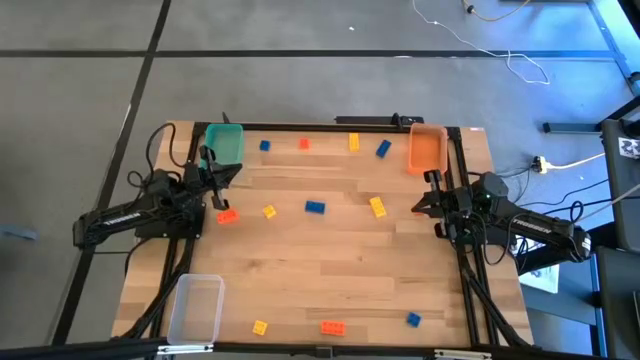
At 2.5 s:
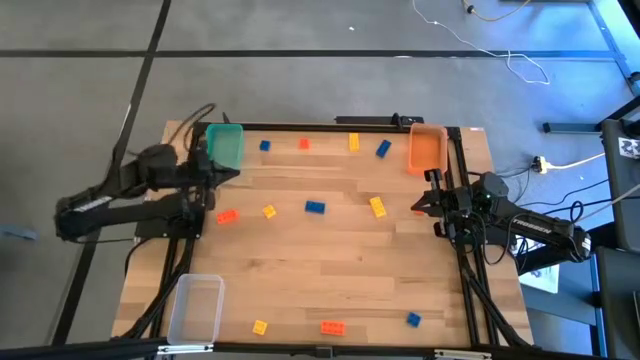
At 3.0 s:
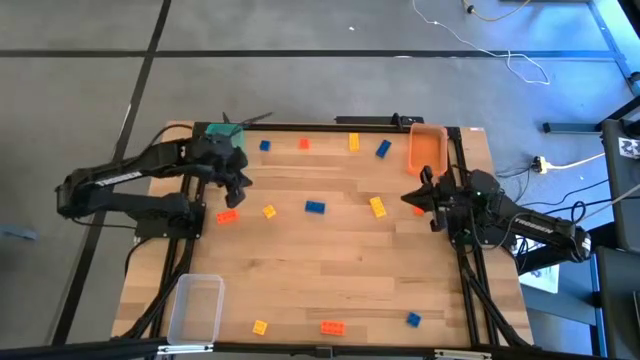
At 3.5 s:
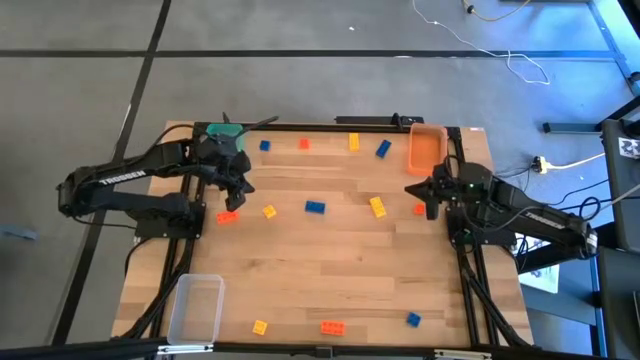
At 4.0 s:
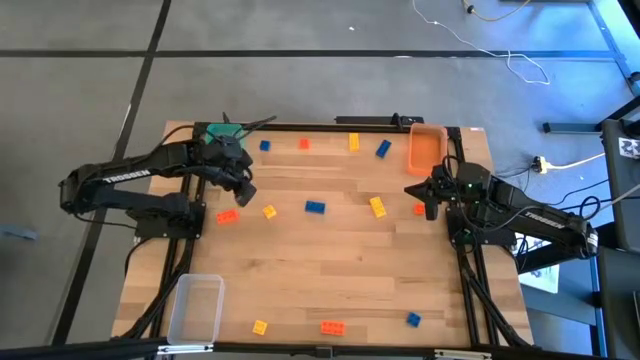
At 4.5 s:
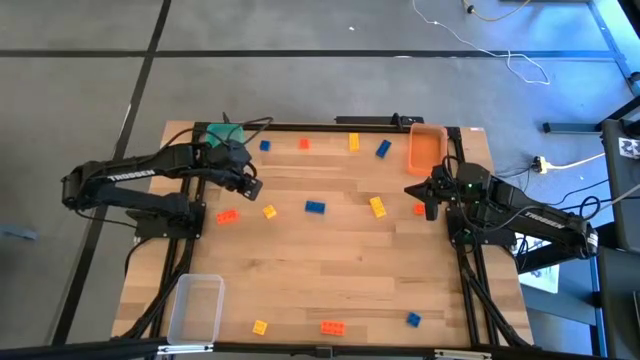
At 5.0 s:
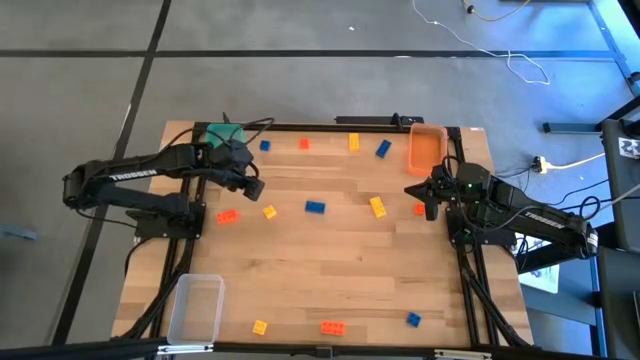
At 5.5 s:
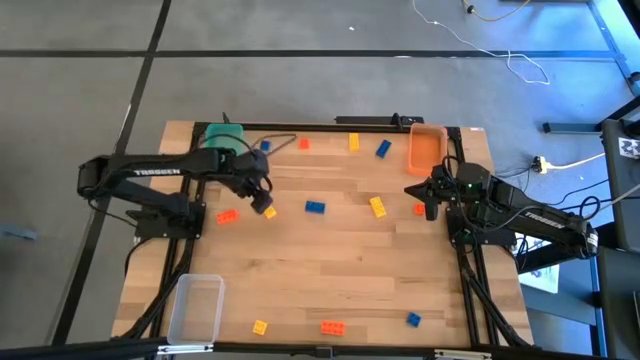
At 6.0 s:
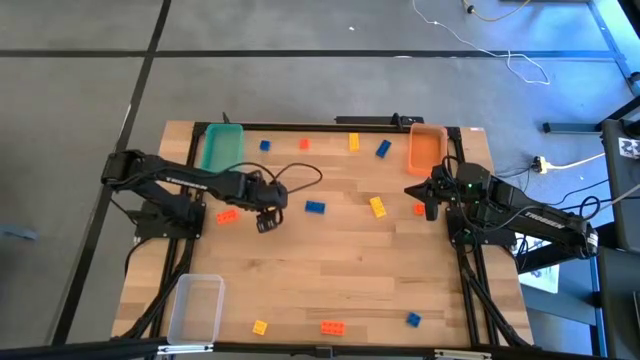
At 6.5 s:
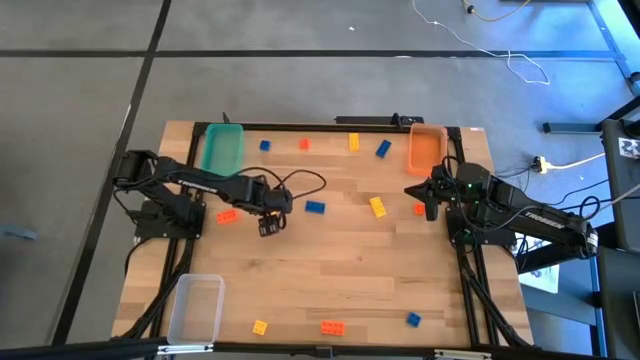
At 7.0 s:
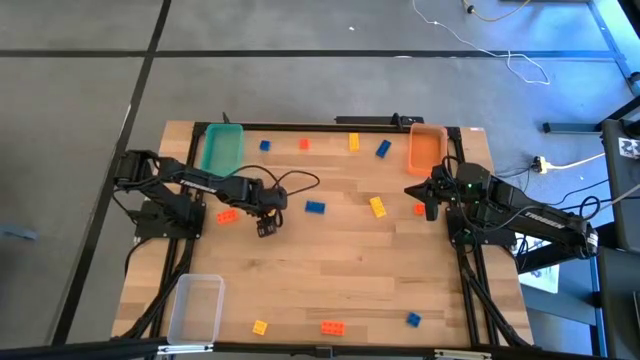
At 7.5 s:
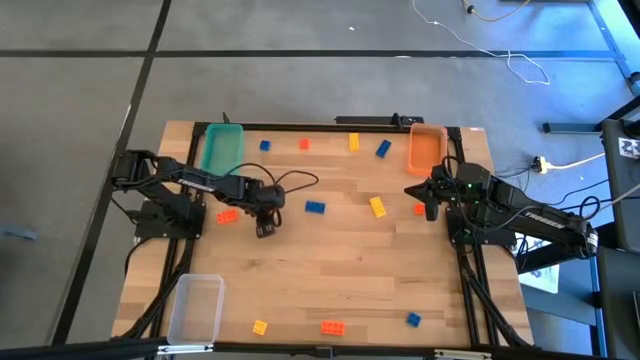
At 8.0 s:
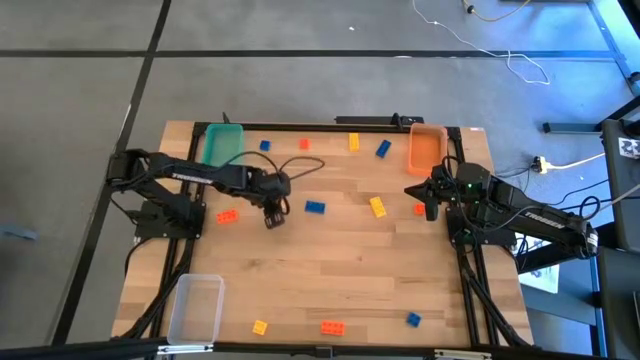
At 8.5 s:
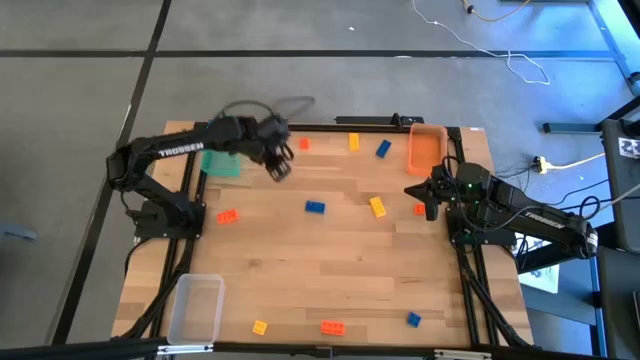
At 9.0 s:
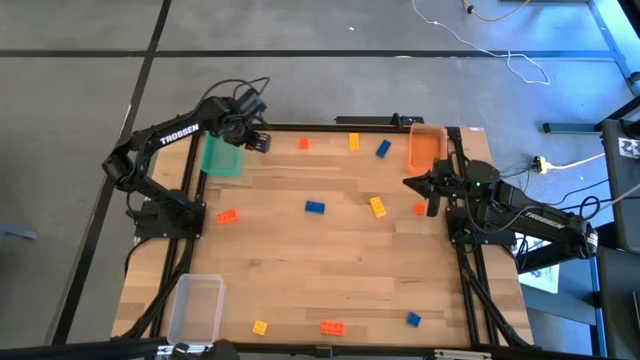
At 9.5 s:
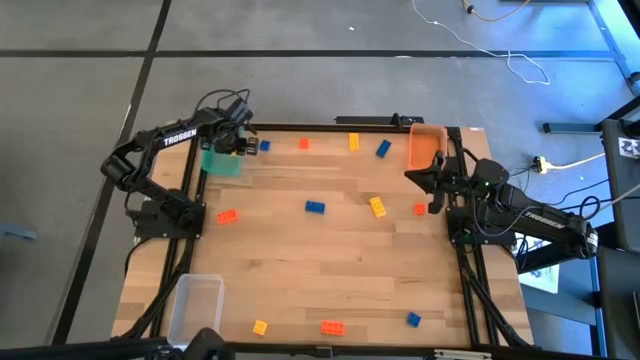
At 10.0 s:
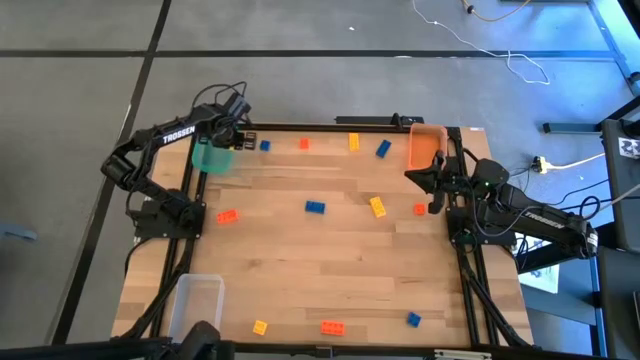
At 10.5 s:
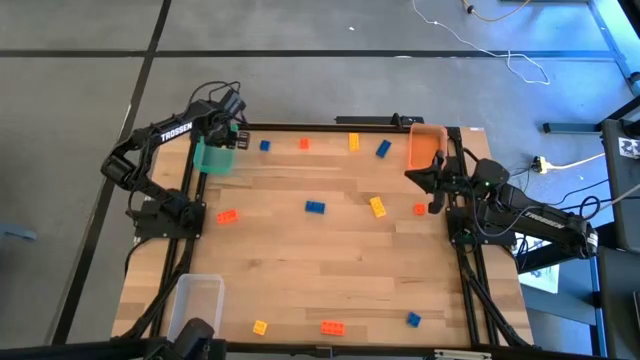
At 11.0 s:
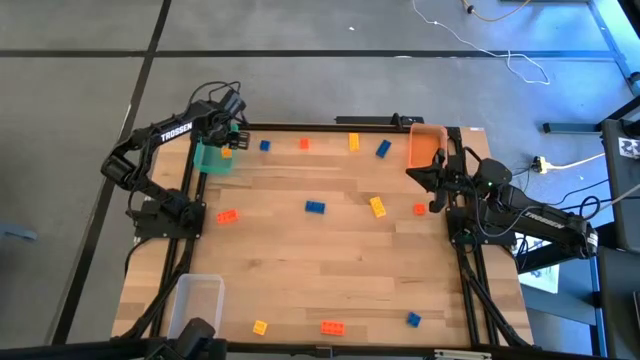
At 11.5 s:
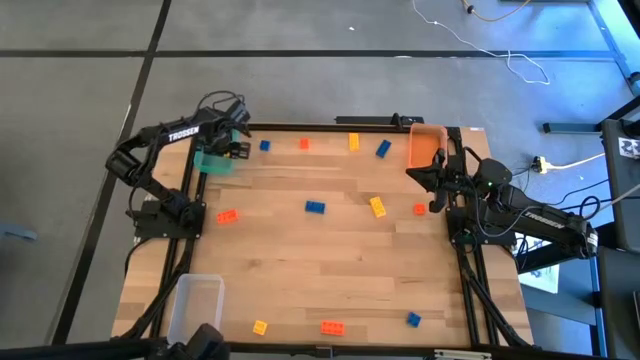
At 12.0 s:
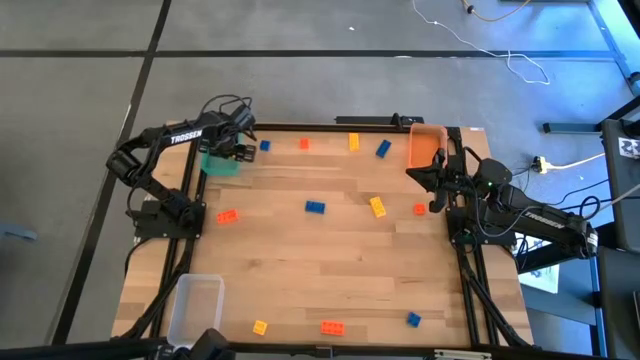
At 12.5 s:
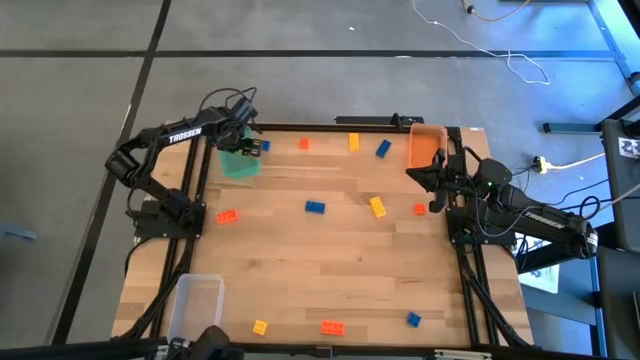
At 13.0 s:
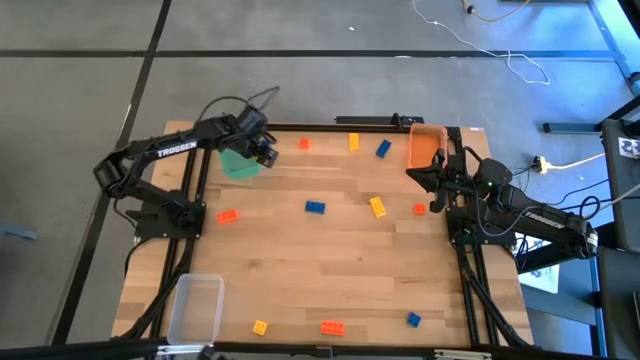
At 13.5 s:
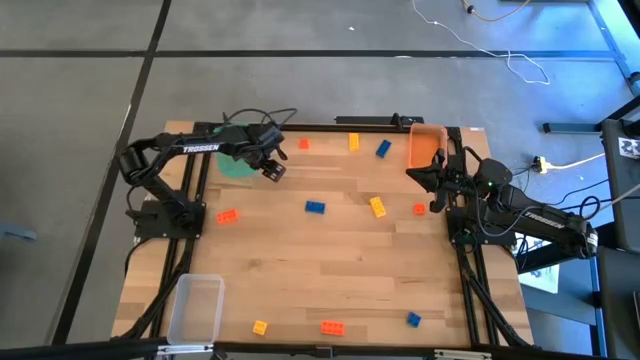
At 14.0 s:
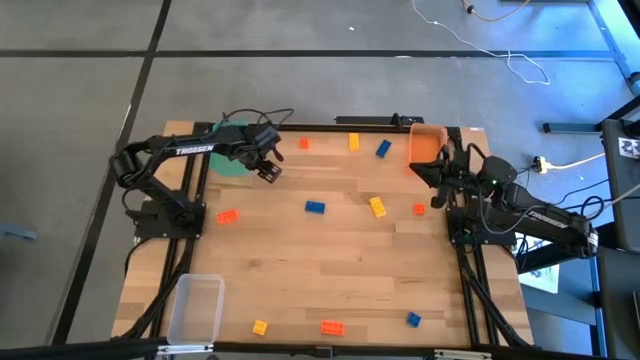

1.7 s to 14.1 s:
Task: Sort & place blocks by color
Put the yellow game piece into the green bin

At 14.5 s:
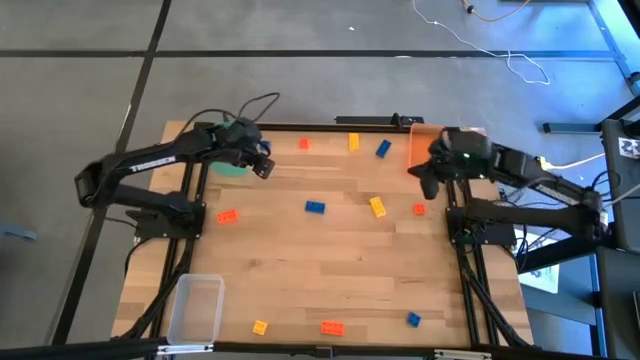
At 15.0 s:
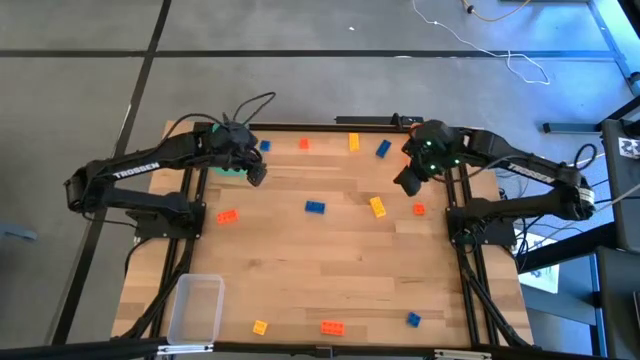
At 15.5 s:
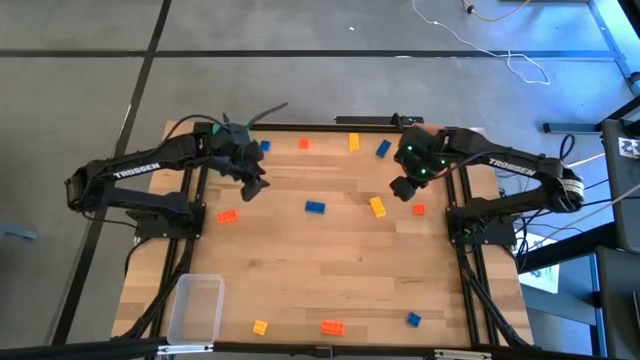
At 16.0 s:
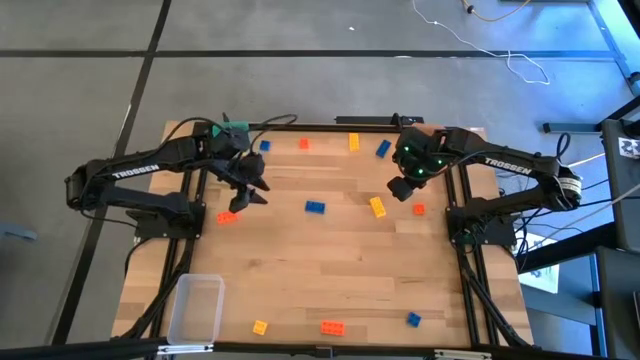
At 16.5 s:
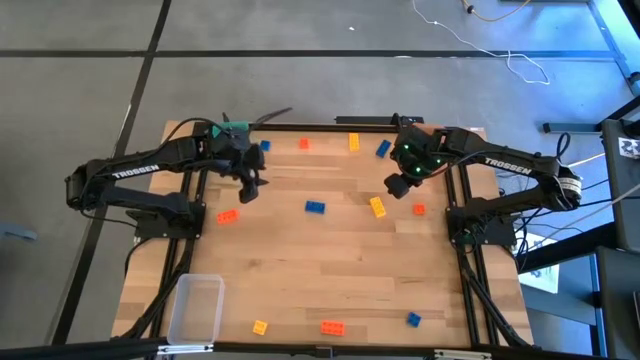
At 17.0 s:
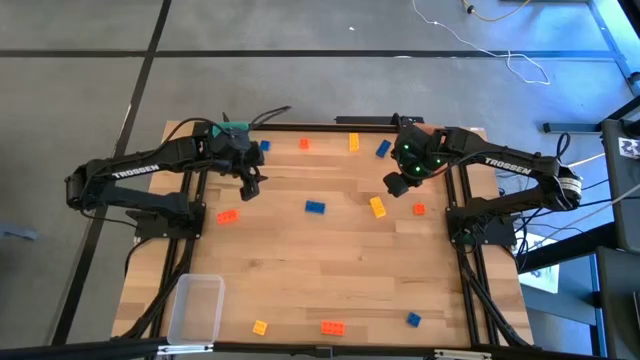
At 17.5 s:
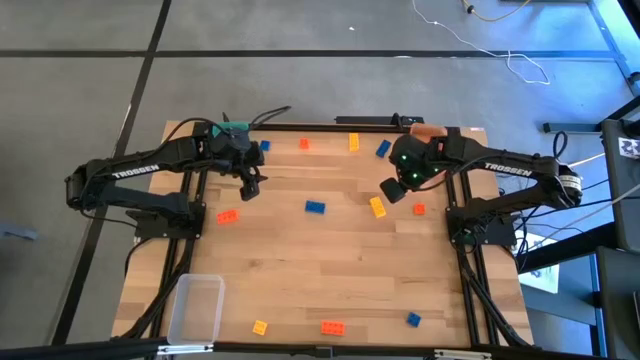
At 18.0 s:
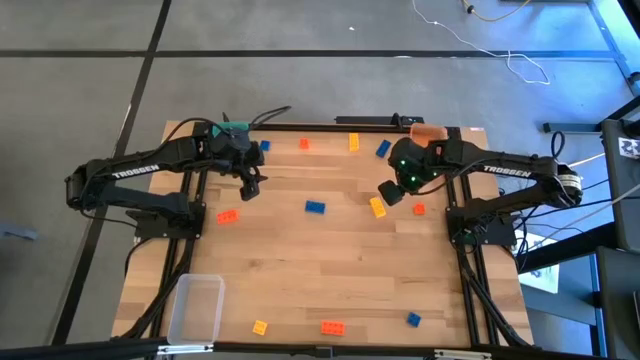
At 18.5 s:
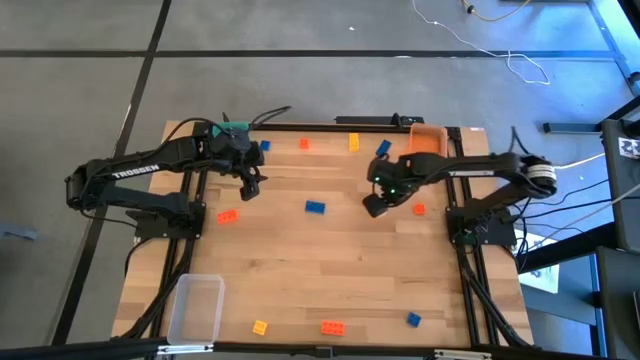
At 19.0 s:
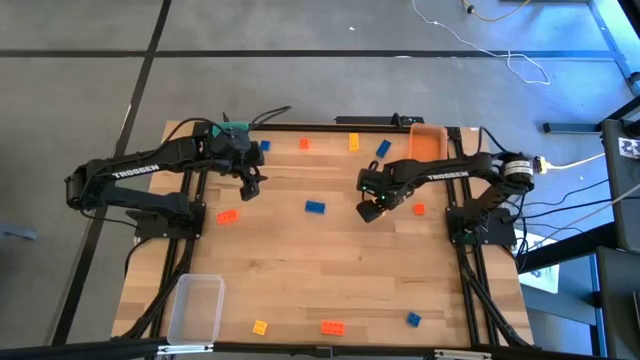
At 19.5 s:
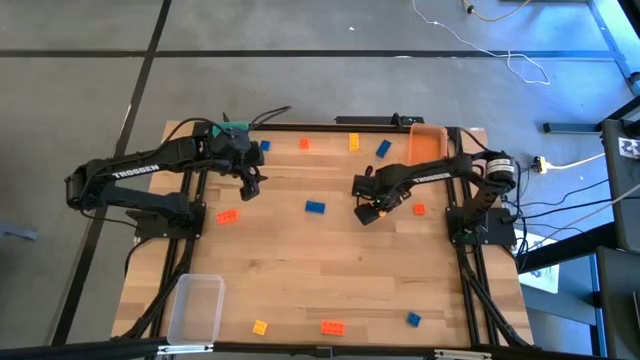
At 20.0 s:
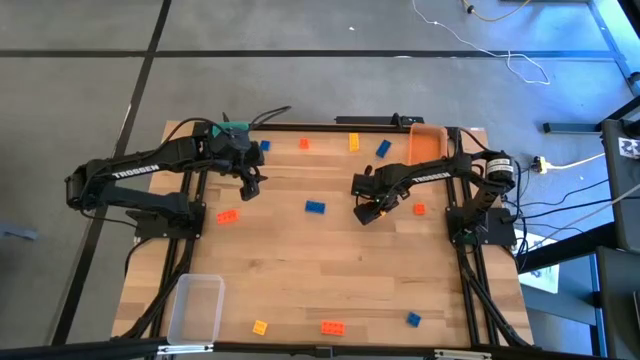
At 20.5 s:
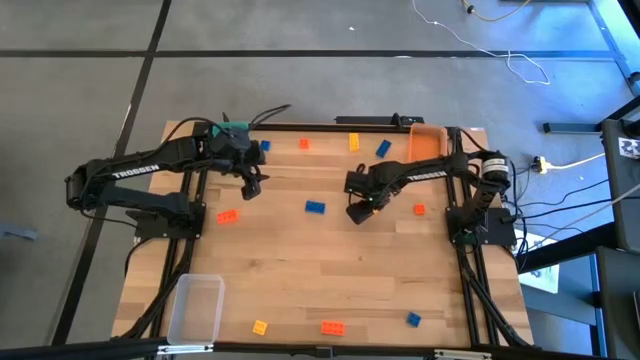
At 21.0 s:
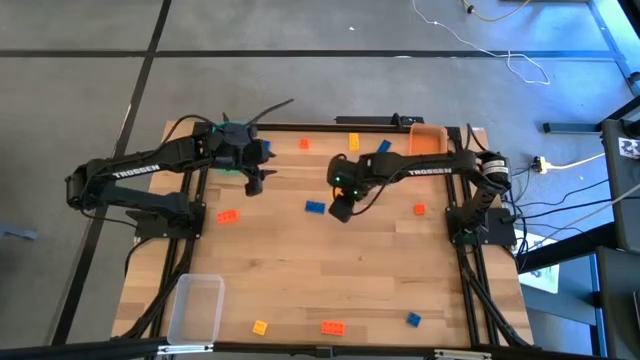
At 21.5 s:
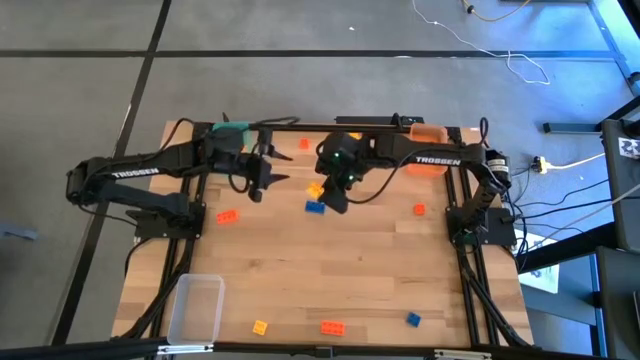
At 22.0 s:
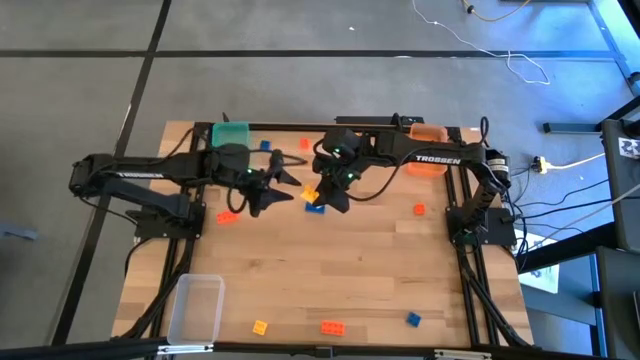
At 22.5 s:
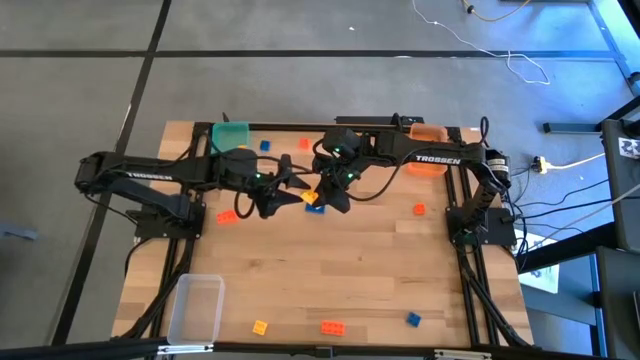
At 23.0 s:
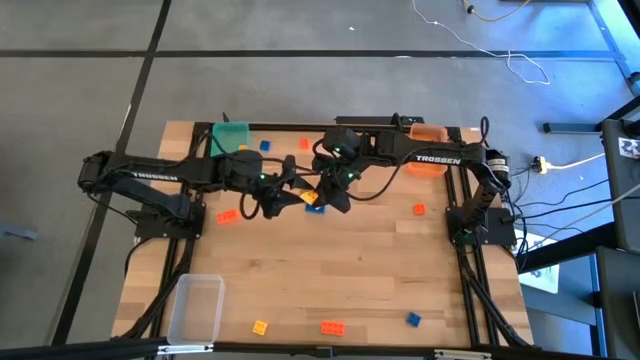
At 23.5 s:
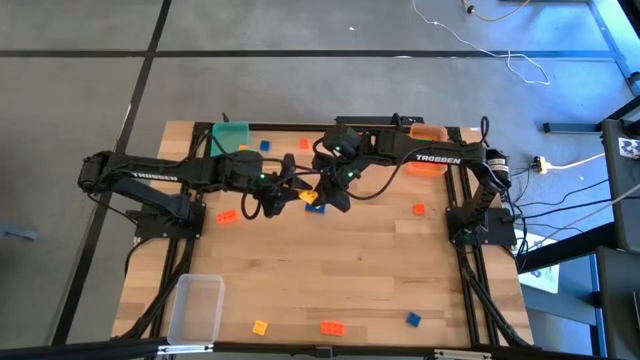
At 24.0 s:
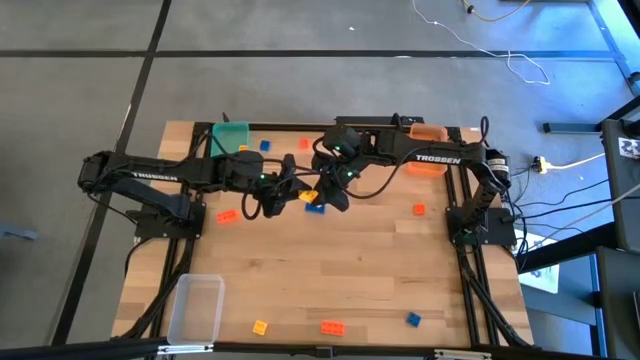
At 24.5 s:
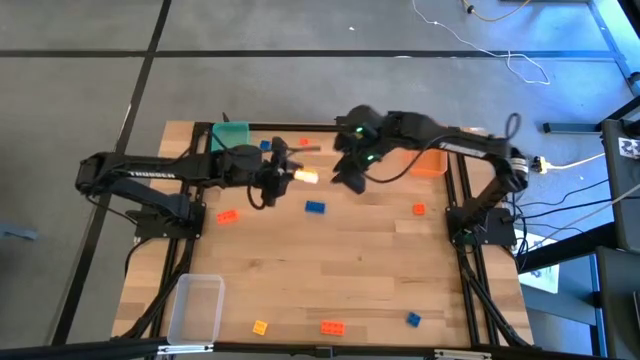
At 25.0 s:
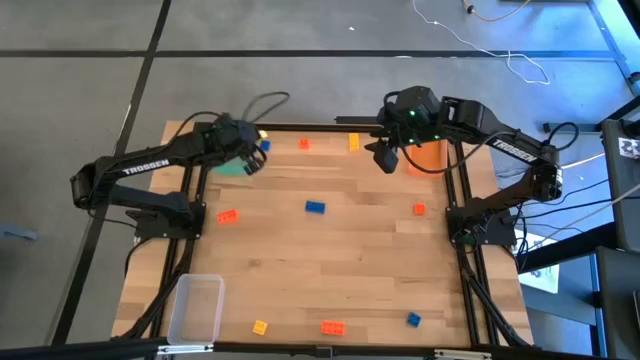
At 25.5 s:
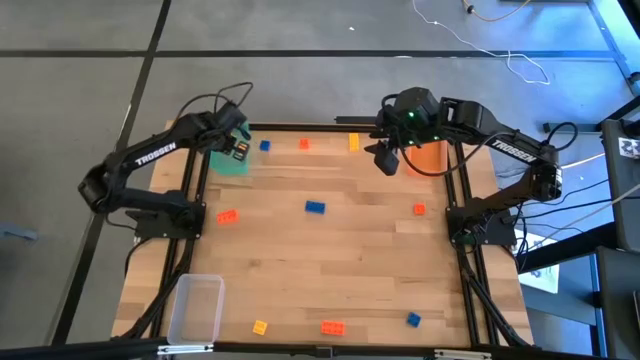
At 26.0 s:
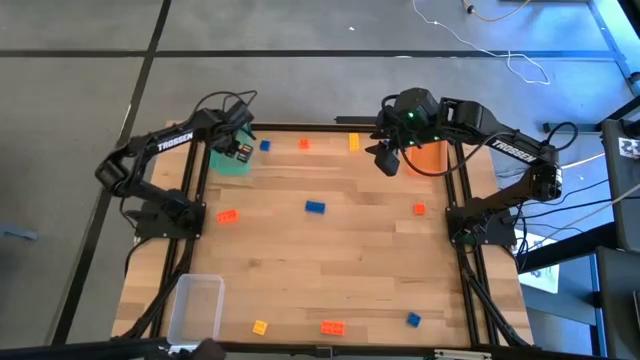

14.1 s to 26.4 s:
Put the yellow game piece into the green bin
